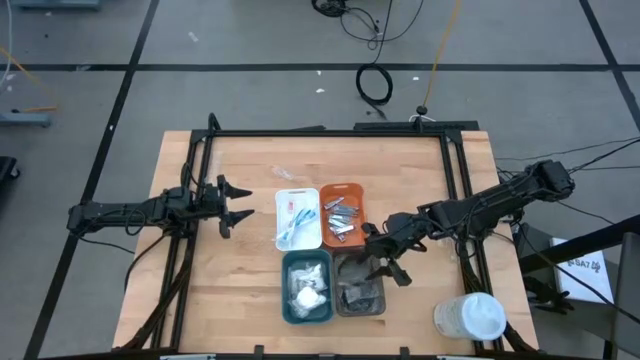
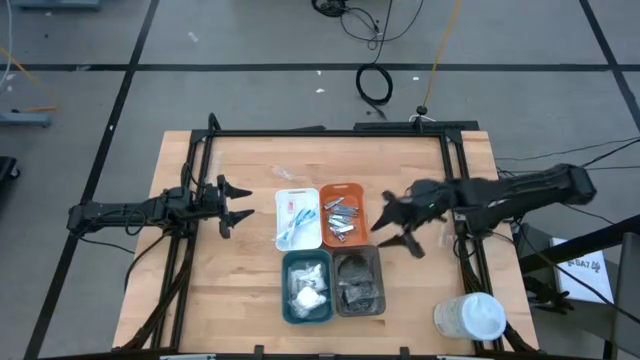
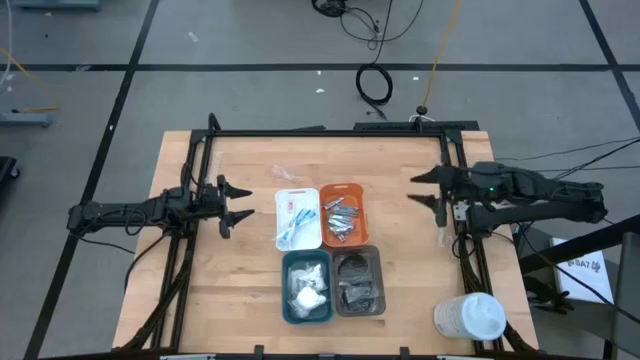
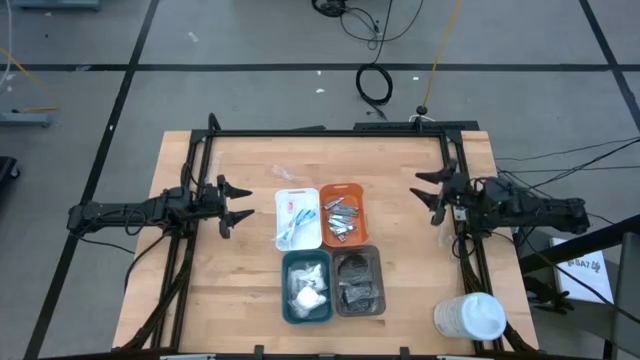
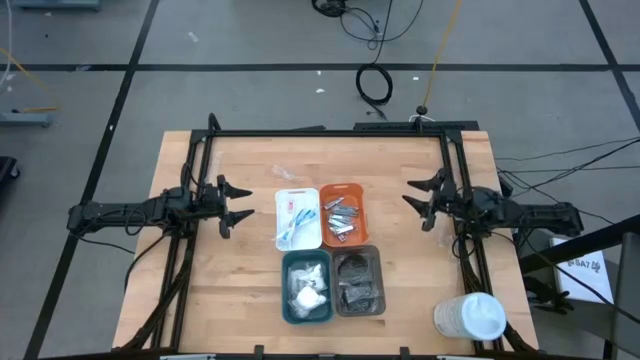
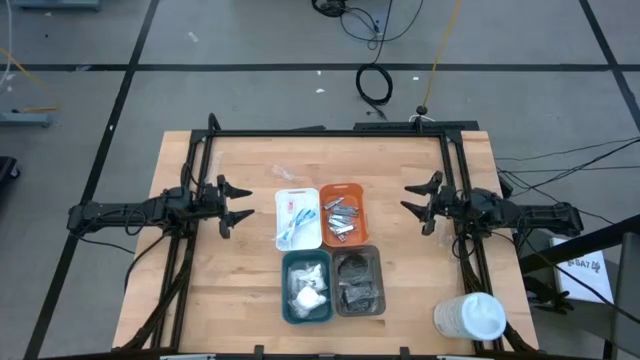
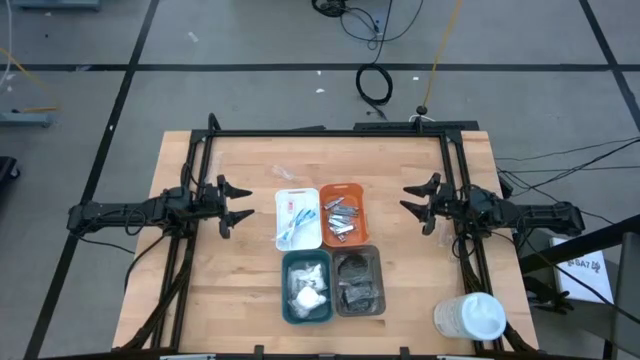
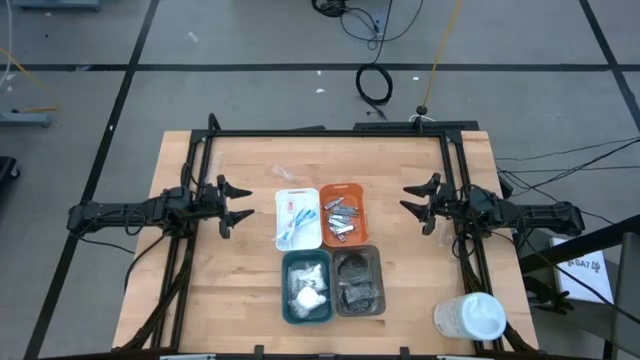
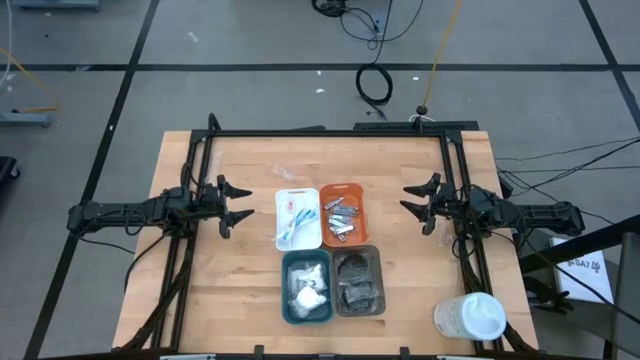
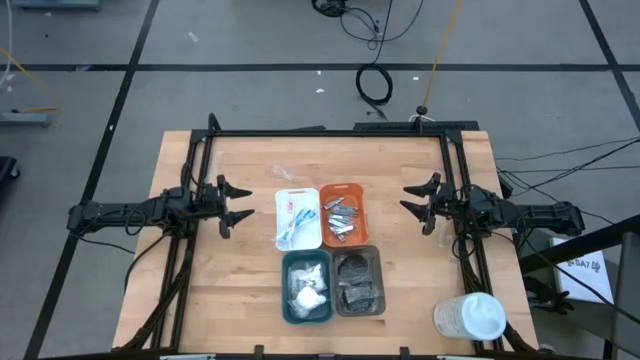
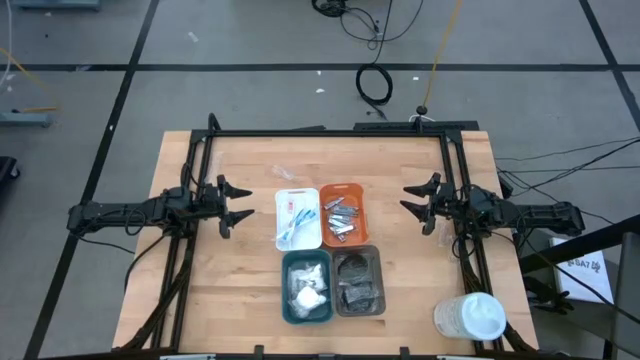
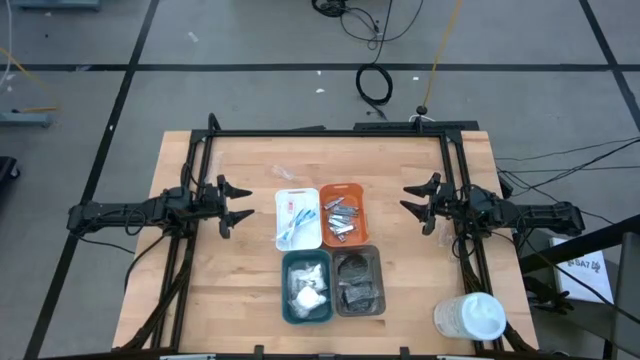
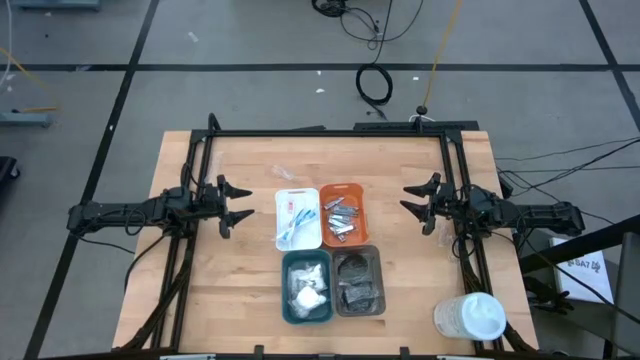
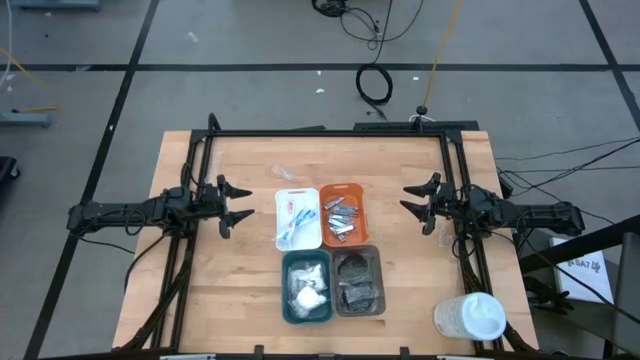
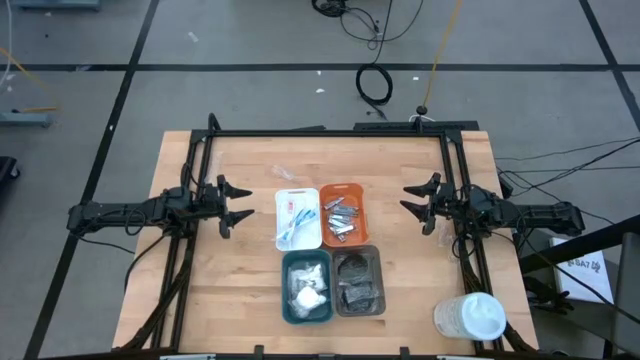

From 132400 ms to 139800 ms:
Task: Pick & Place Travel size toiletries
Return to Home Position

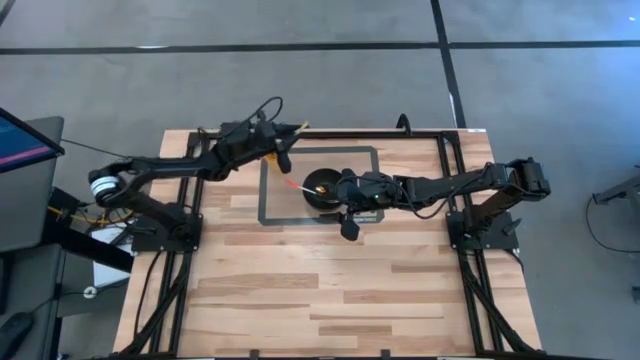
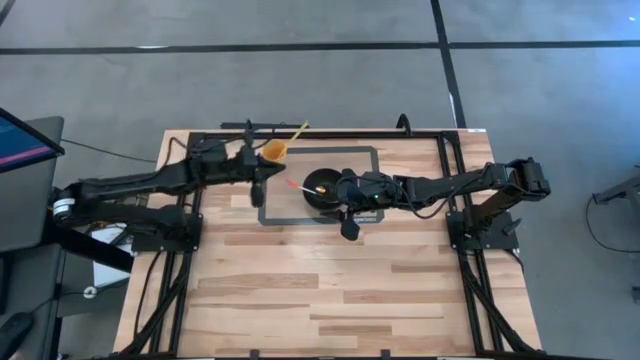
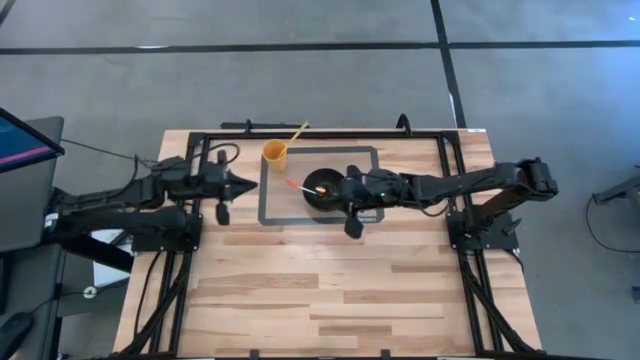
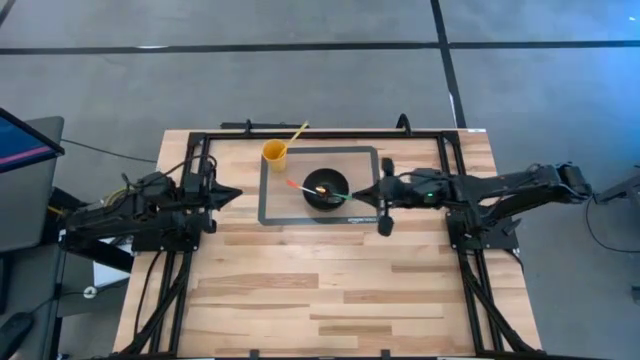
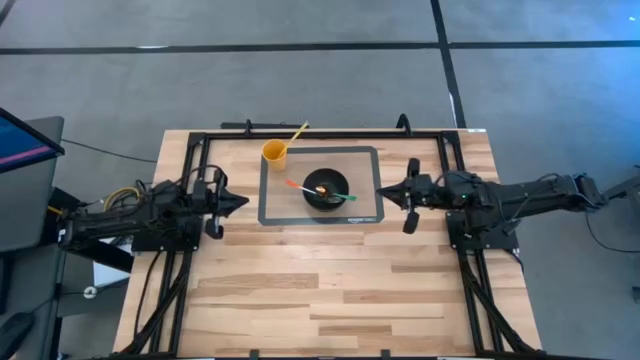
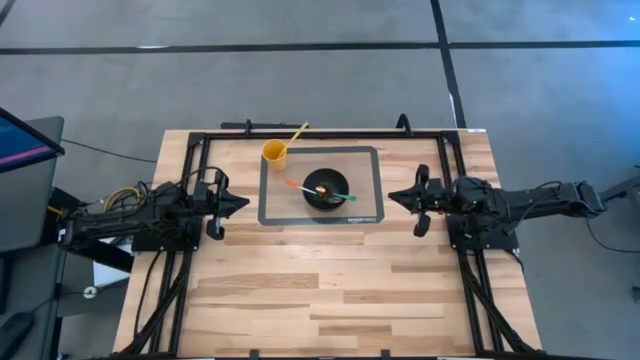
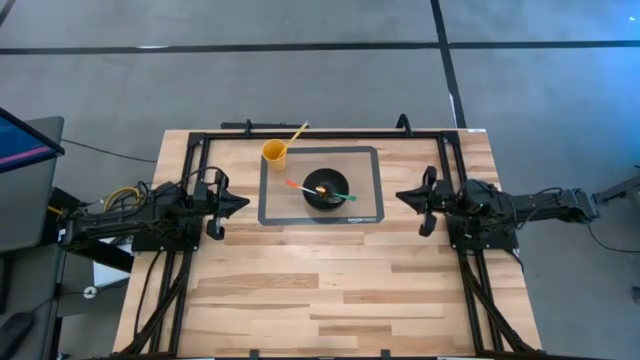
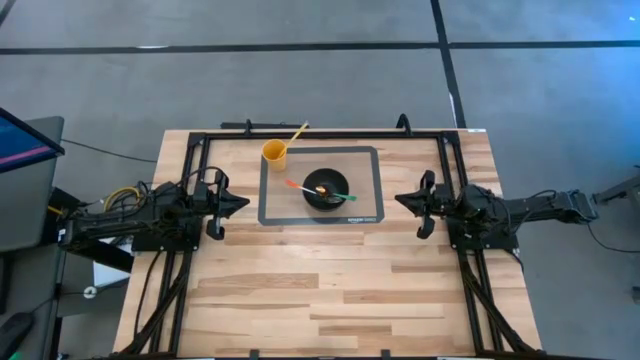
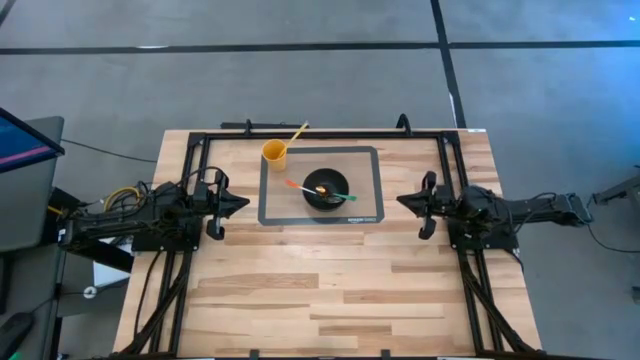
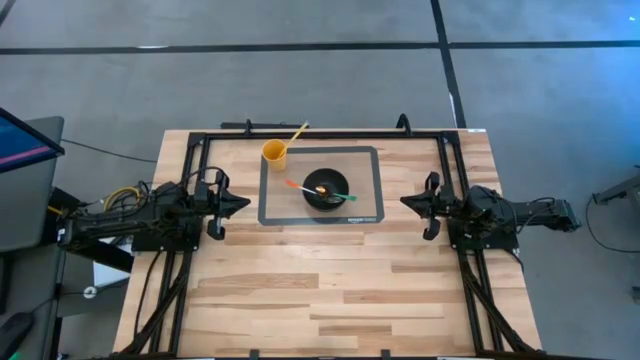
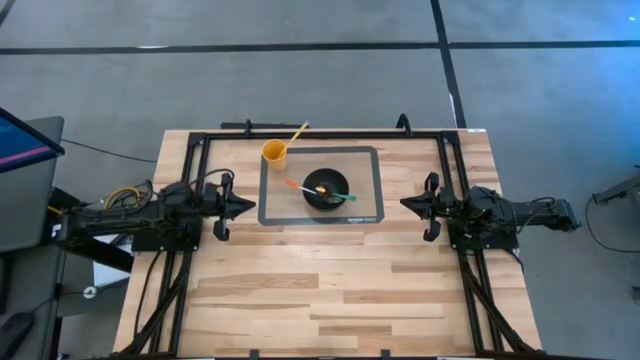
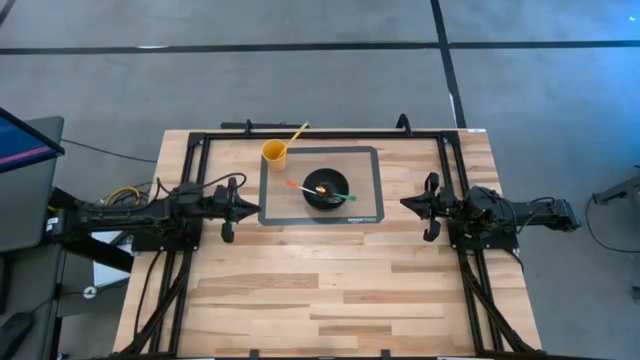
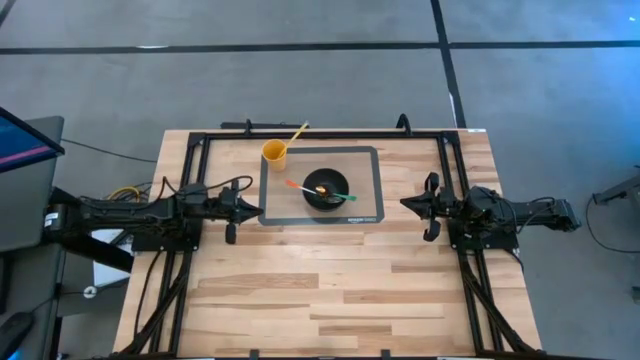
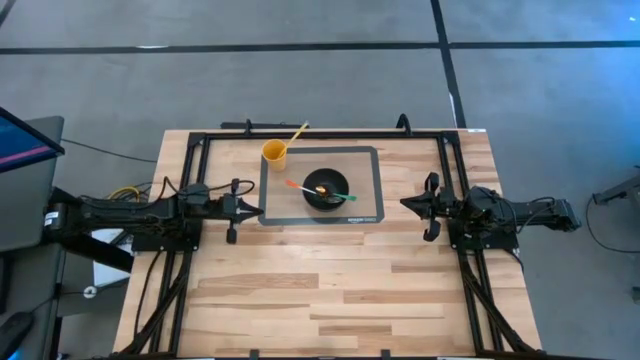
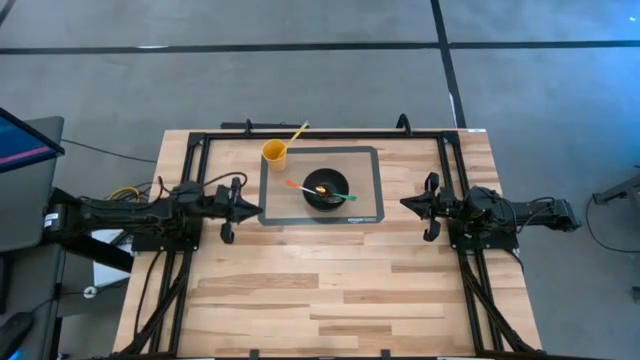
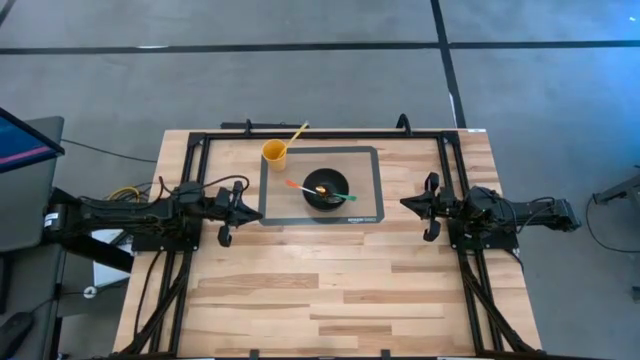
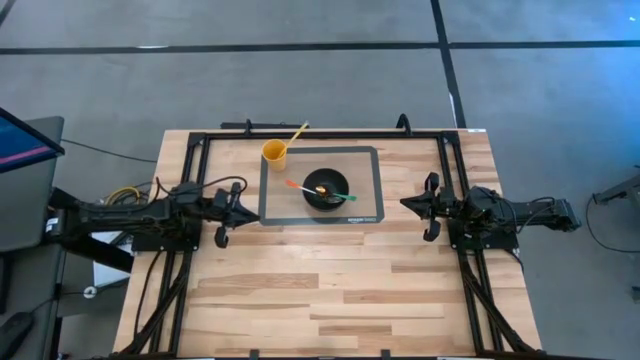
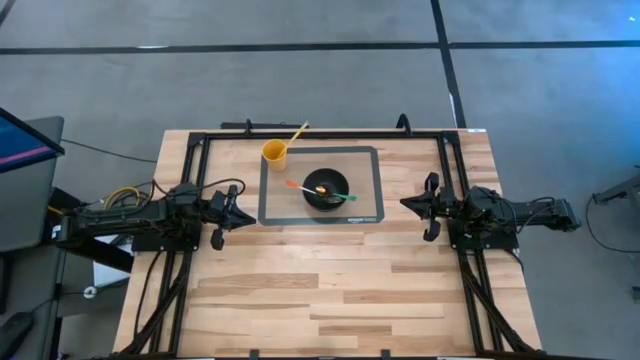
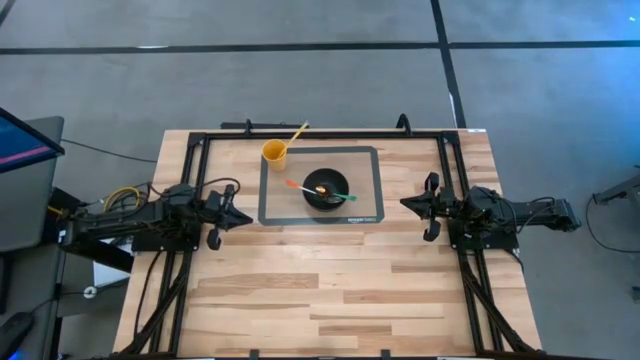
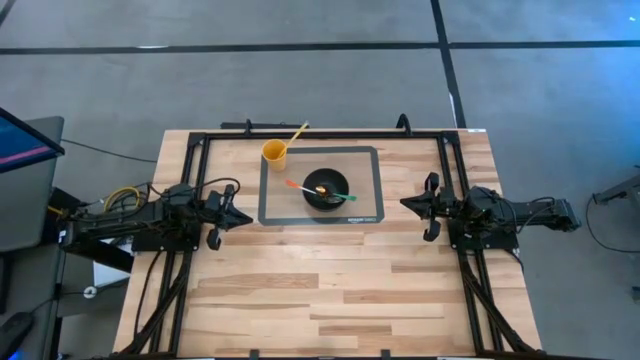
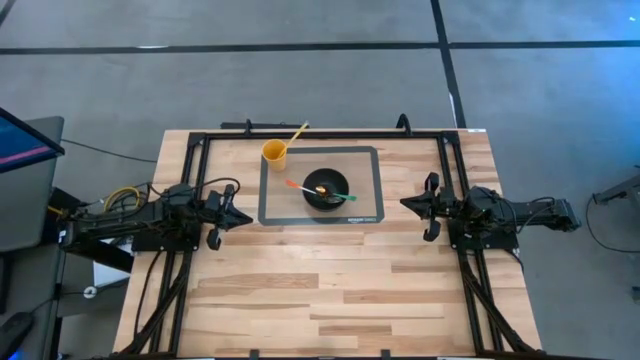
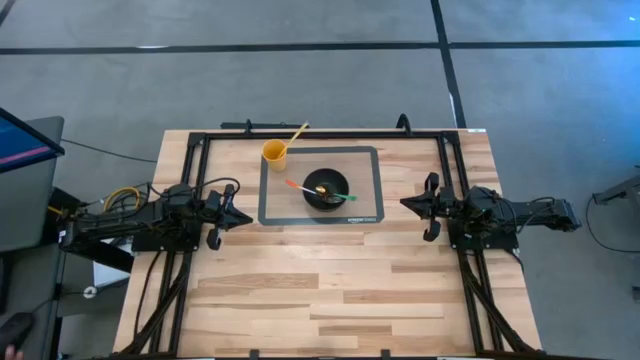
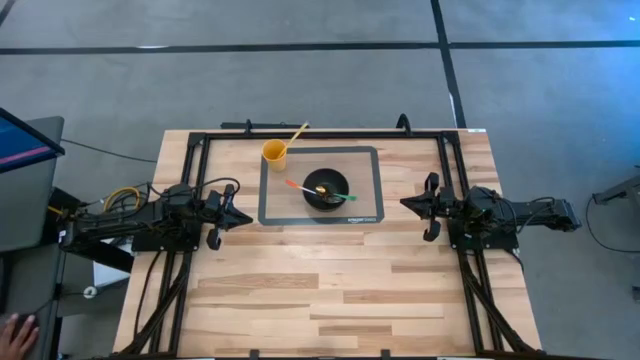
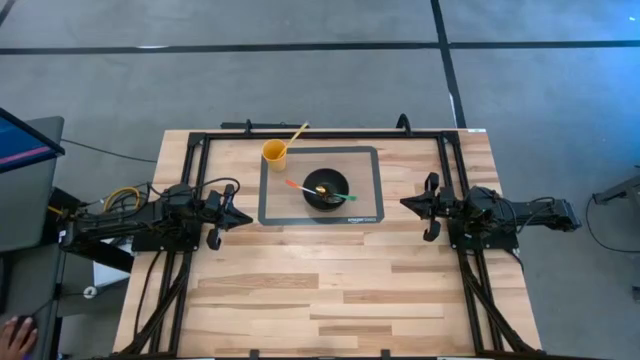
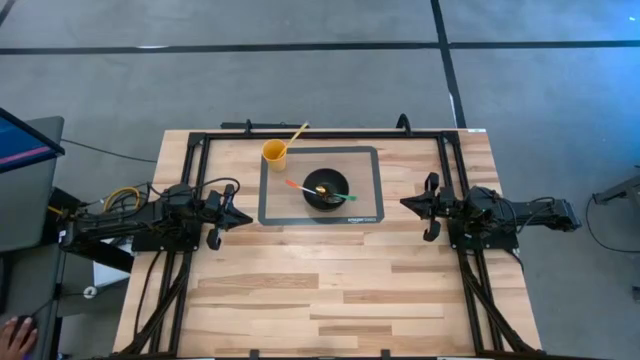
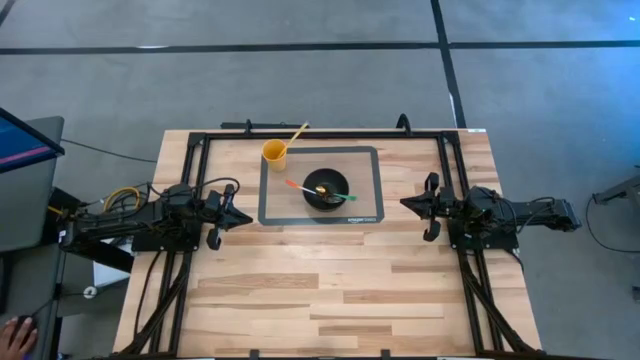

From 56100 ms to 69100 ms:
Task: Pick & Place Utensil
Return to Home Position
